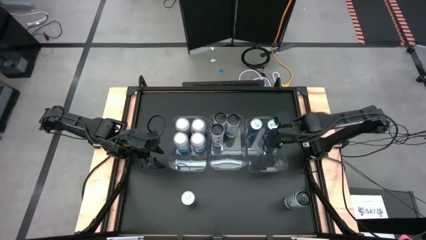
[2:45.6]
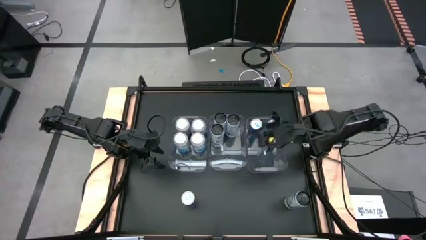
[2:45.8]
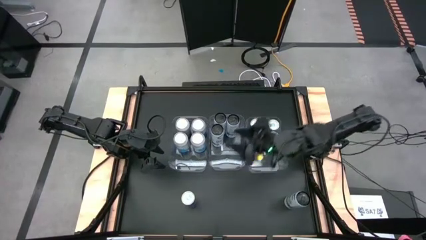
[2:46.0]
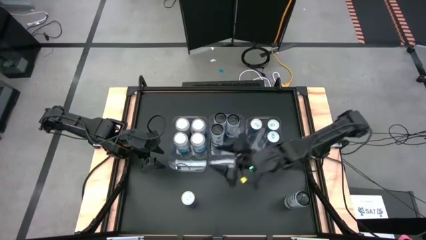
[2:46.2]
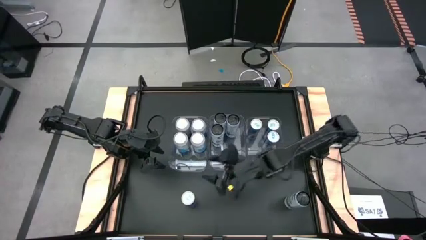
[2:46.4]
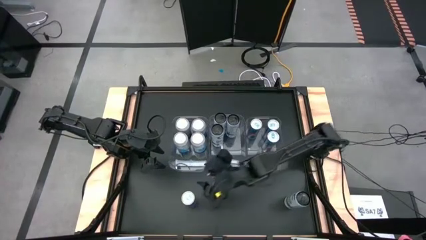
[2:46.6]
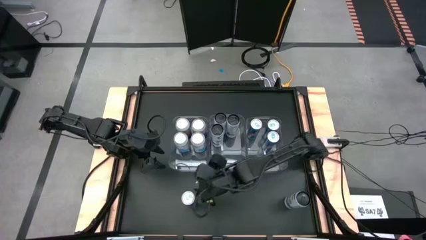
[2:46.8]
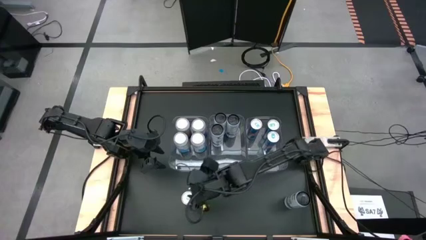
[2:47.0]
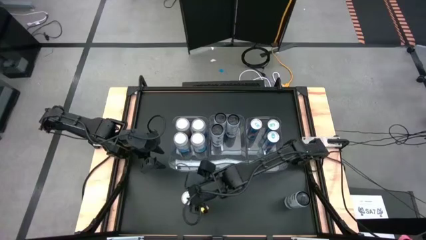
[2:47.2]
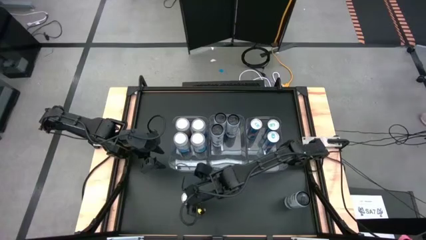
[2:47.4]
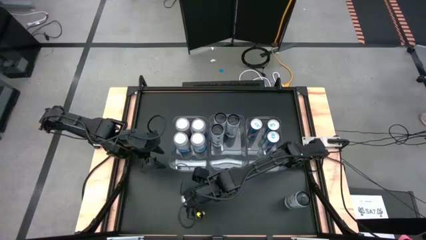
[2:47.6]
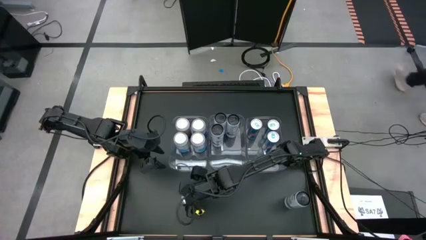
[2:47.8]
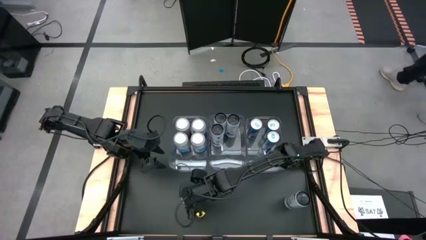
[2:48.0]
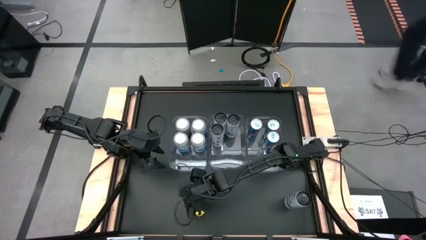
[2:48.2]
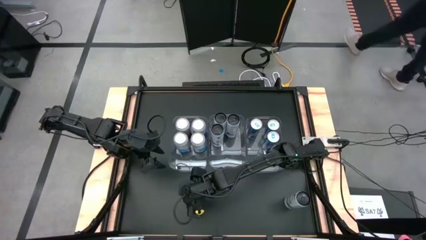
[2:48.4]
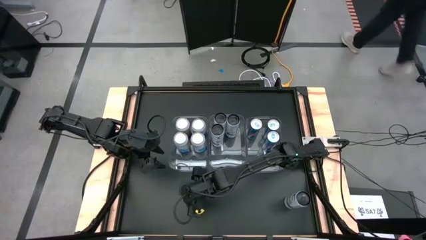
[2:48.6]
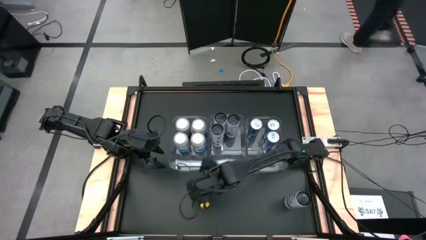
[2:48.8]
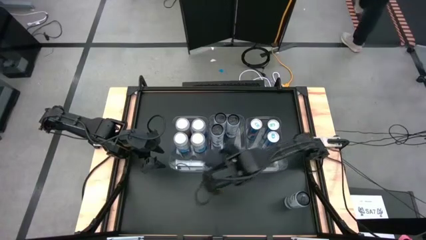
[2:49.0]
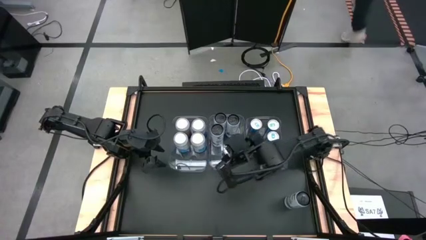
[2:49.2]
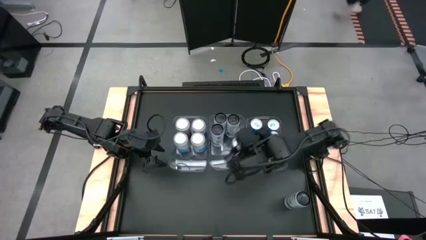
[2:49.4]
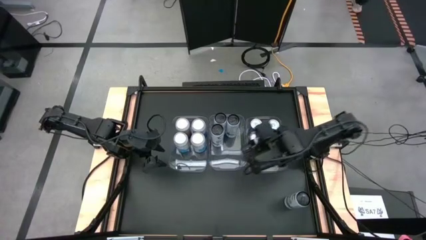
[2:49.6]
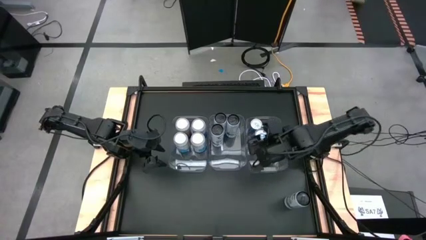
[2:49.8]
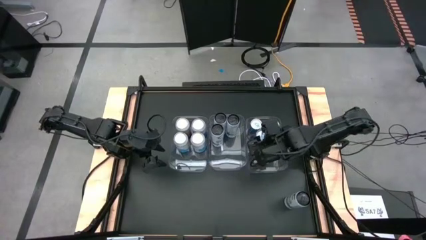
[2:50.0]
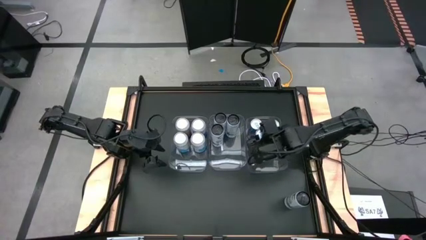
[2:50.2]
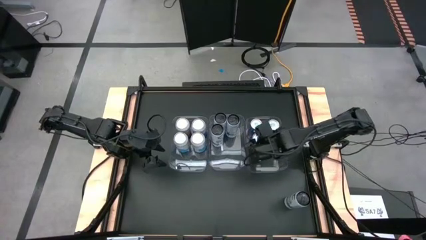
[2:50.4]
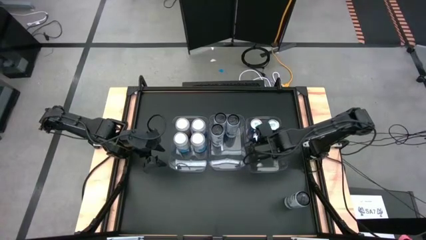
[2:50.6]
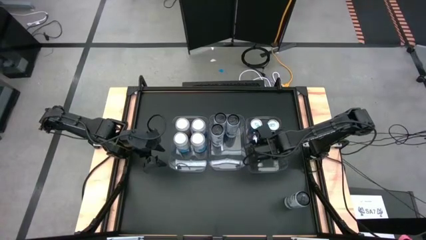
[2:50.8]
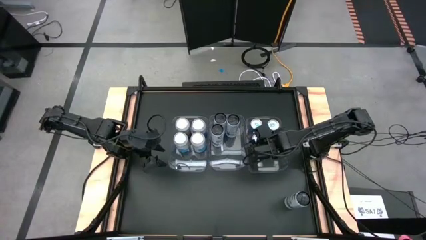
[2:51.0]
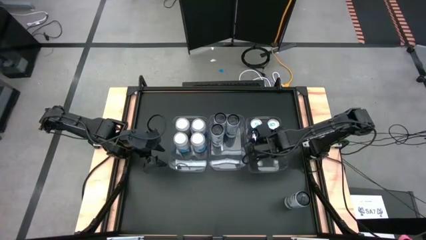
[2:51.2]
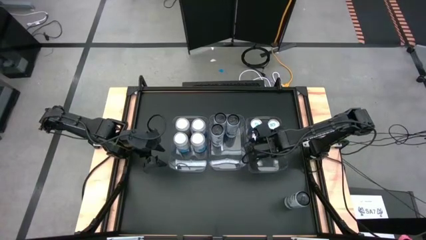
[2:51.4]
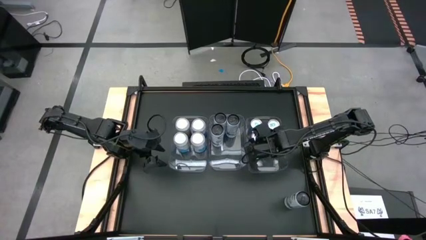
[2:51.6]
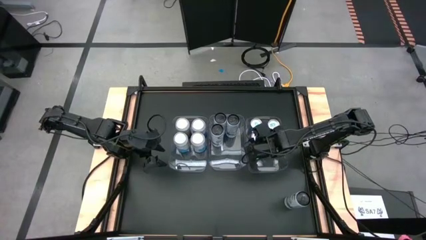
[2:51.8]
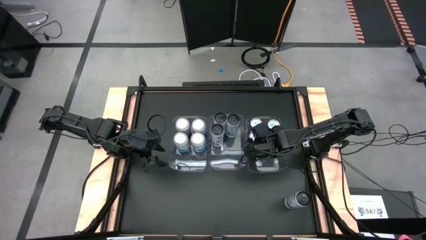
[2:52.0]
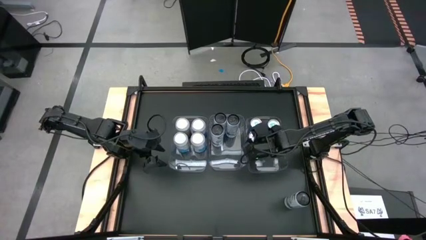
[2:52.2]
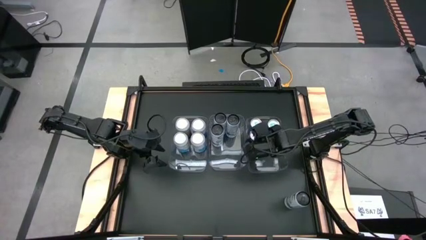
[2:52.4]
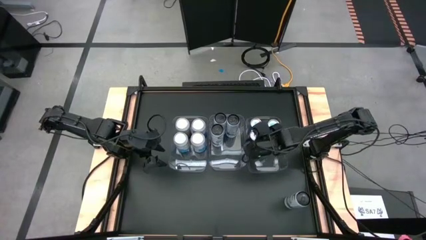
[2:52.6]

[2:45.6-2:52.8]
Task: Sort soda cans
Put the blue soda can into the right transparent bin

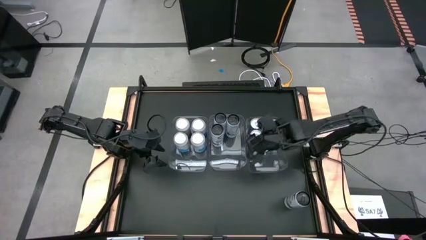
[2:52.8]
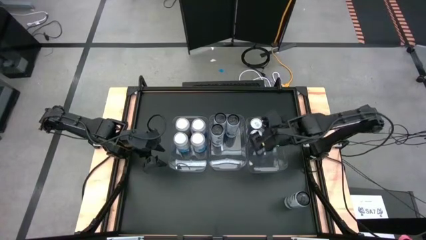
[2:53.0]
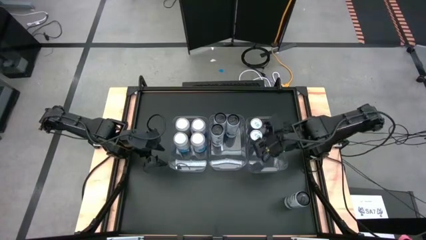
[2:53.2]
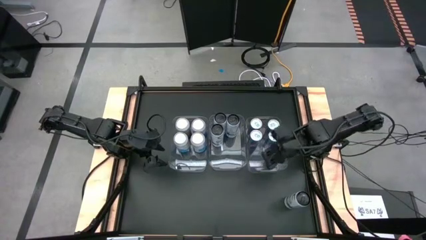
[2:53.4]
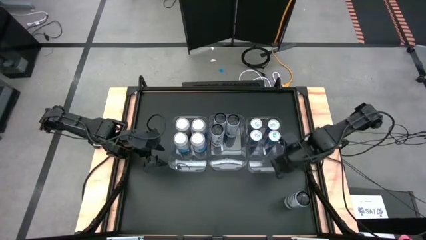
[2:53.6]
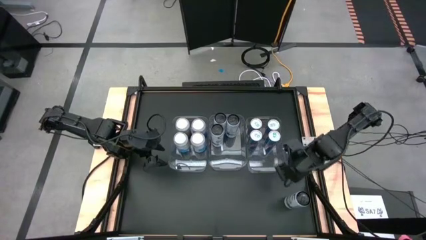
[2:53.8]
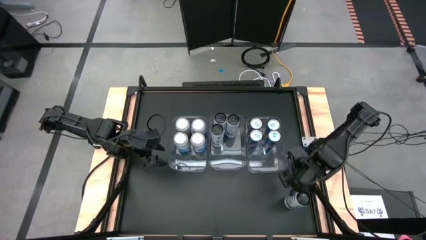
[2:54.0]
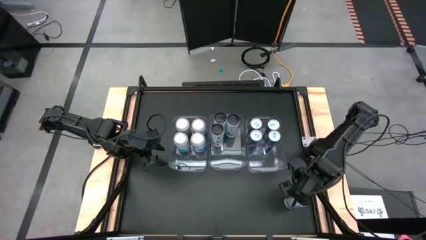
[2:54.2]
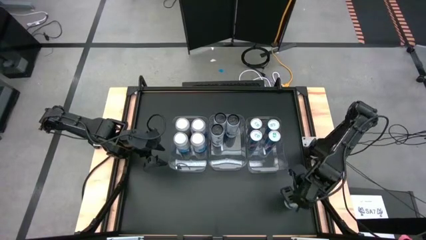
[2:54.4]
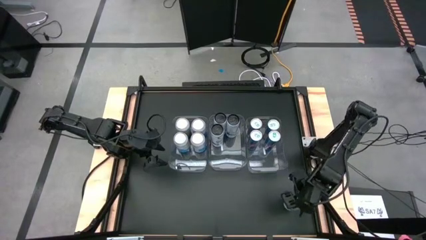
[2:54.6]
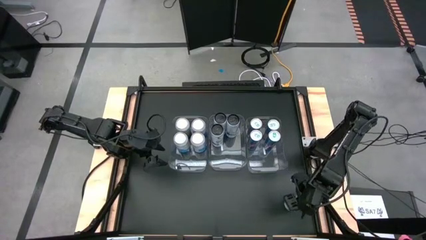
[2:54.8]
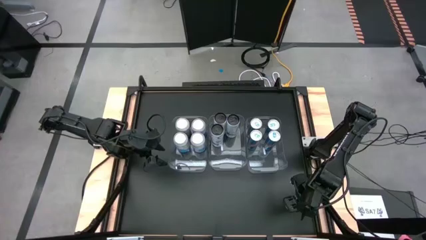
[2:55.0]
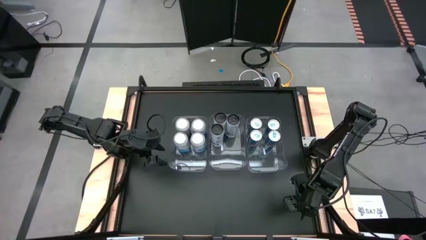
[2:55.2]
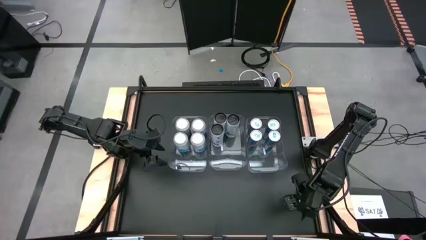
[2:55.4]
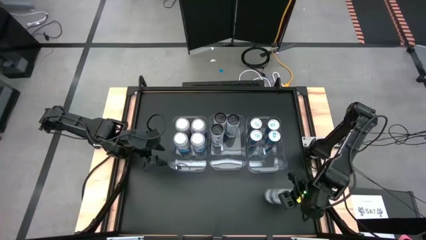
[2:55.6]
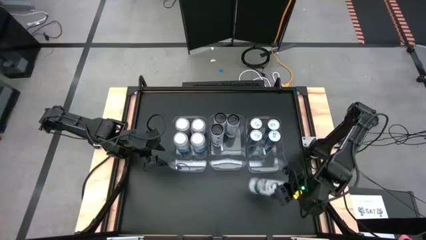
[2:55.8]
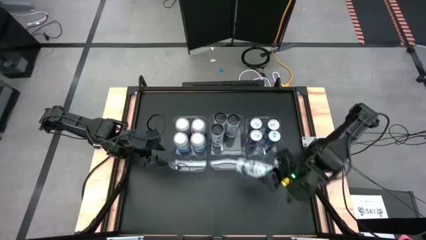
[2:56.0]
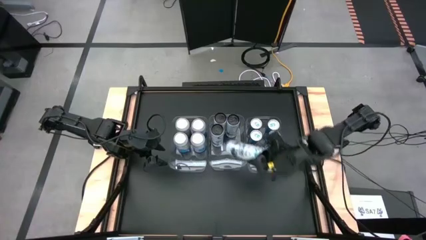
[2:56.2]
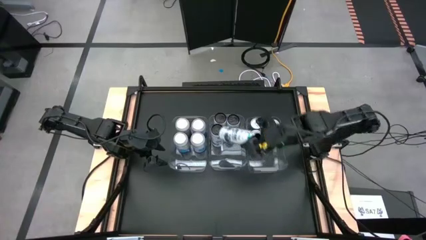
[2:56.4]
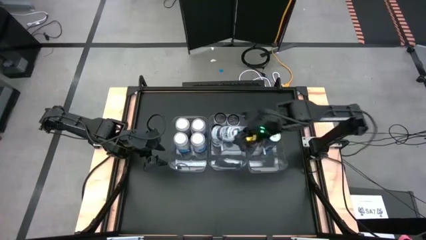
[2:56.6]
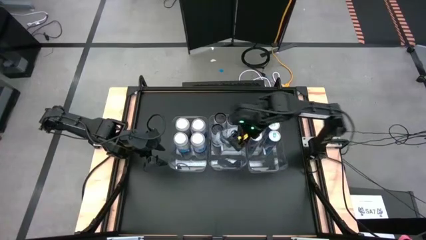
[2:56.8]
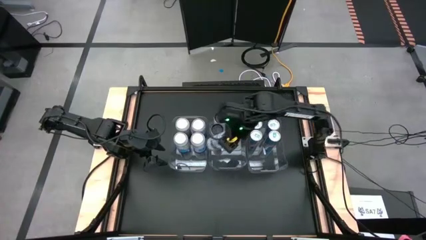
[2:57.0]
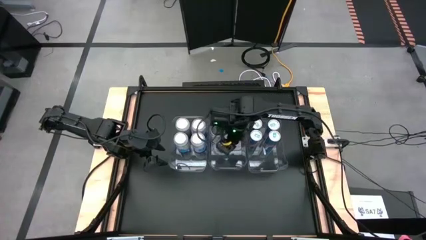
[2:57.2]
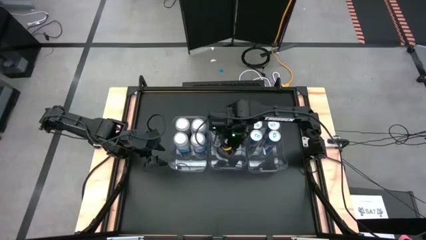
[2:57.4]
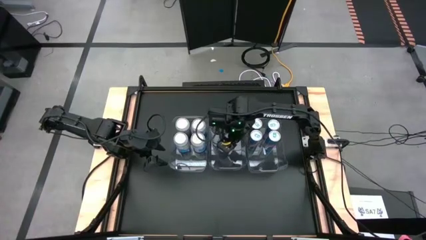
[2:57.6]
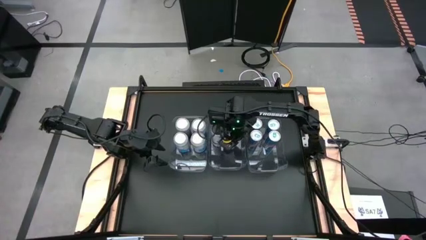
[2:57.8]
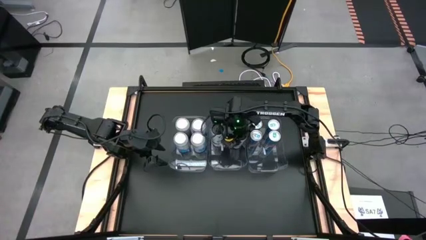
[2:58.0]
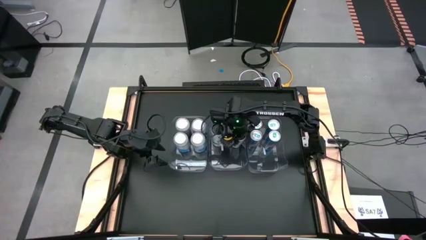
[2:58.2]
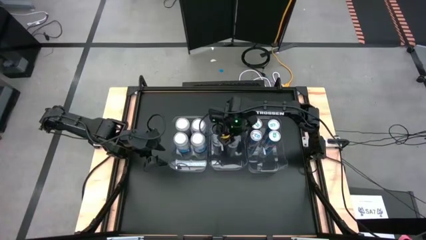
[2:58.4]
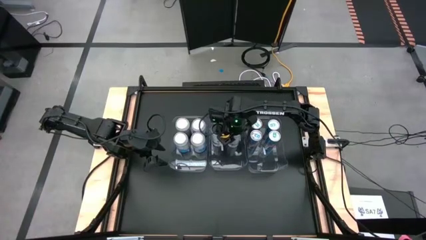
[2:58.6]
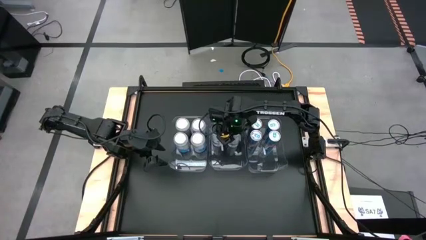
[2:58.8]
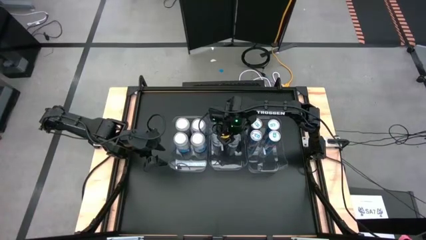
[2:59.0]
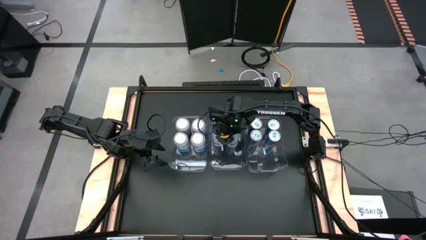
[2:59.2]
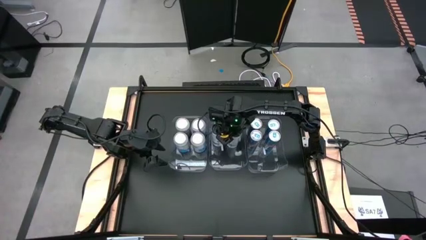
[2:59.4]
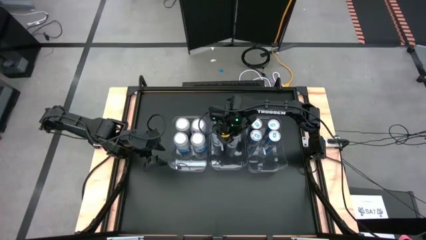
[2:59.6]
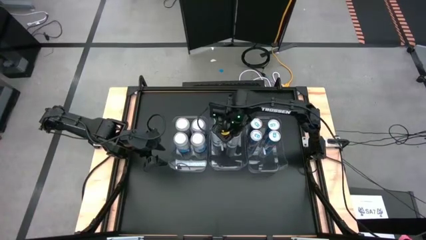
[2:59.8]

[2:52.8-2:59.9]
Put the white-blue soda can into the center transparent bin

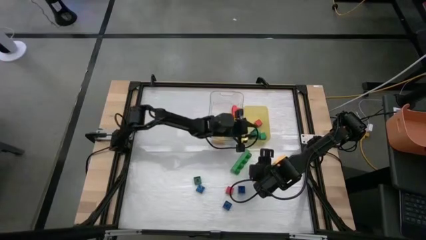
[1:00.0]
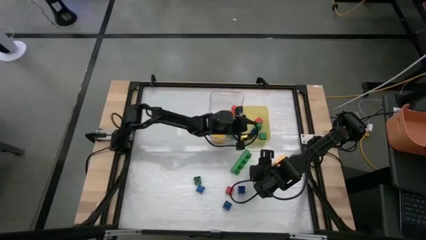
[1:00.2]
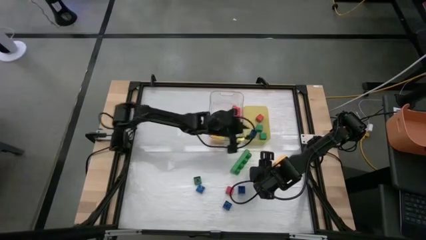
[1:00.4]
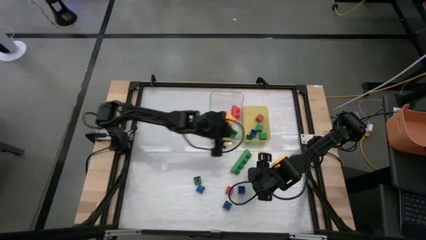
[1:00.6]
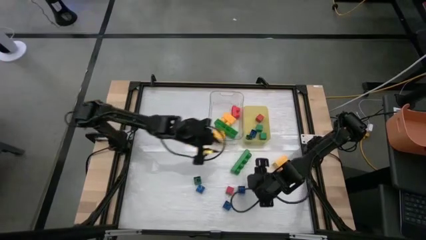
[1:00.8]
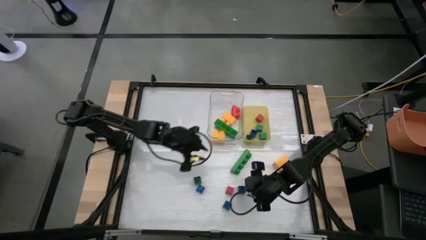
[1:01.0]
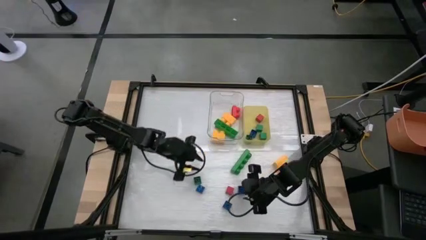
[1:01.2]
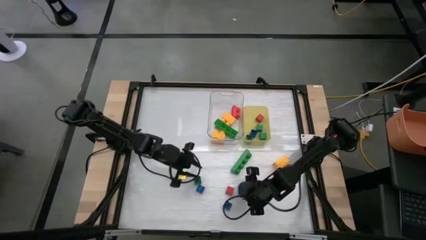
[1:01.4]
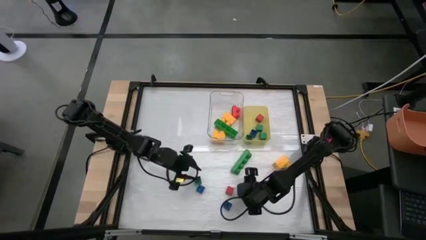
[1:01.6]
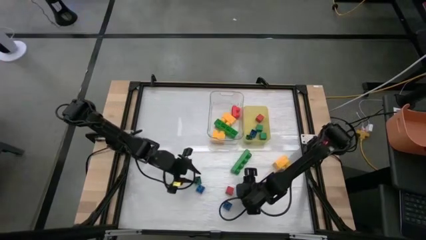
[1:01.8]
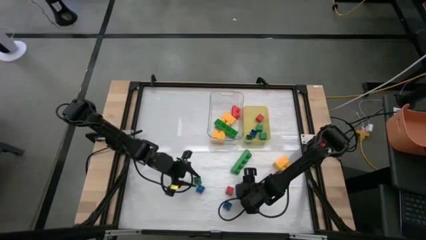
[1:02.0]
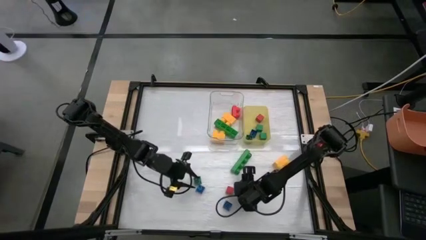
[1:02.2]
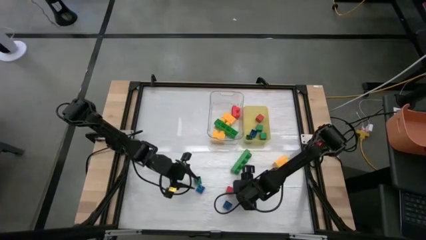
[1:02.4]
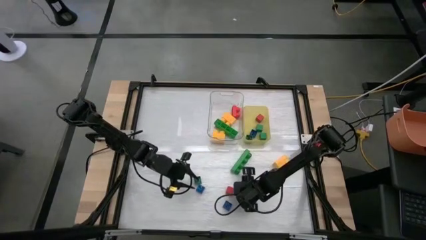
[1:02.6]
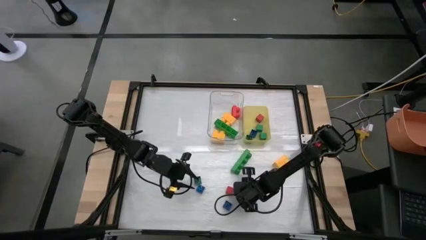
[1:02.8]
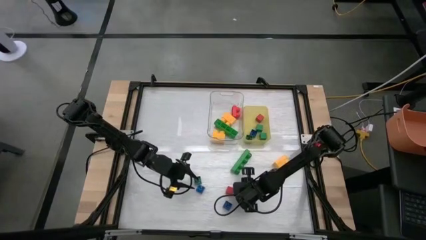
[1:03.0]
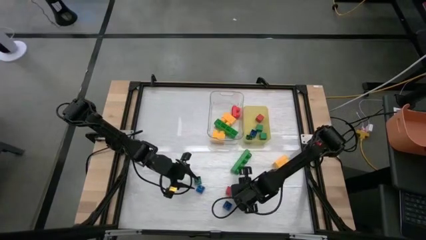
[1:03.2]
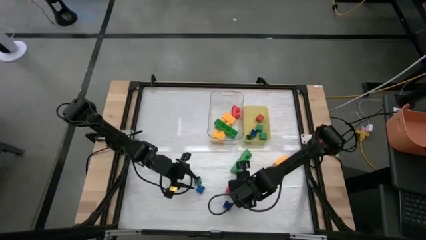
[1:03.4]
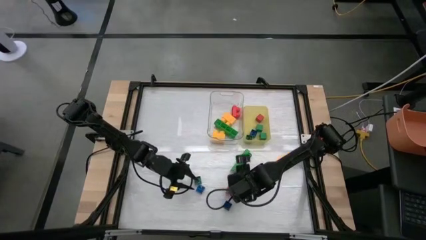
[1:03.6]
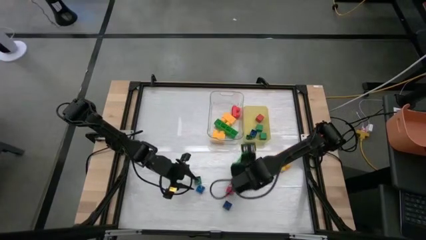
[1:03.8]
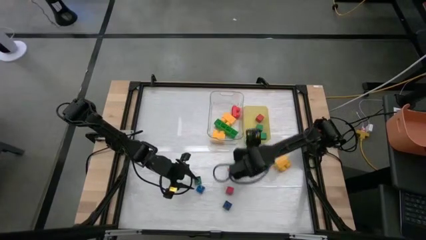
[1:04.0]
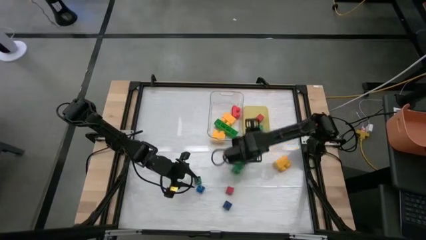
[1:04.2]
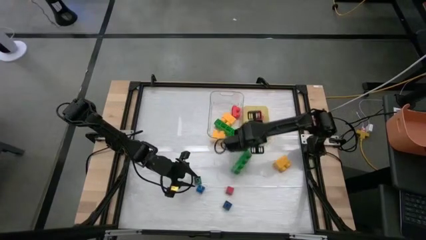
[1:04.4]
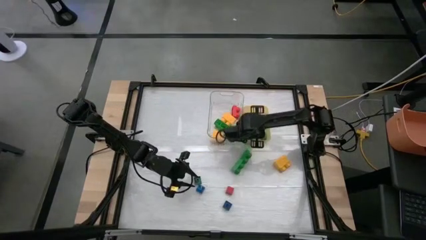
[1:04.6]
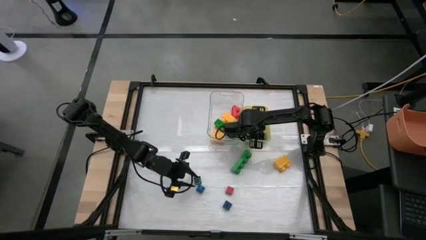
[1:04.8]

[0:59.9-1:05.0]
Task: Sort blocks by size
Put the small blue game piece into the yellow bin
